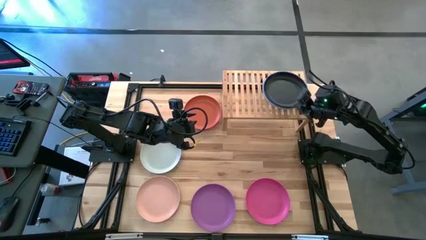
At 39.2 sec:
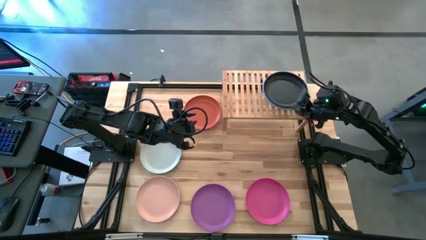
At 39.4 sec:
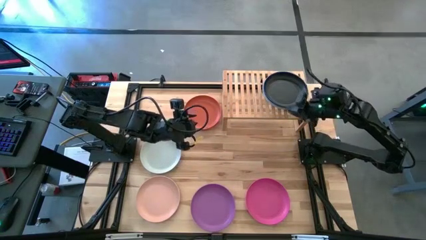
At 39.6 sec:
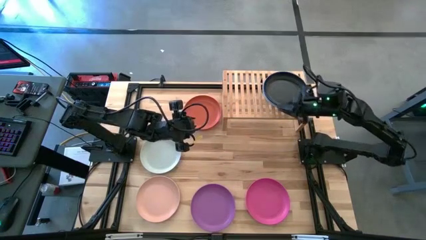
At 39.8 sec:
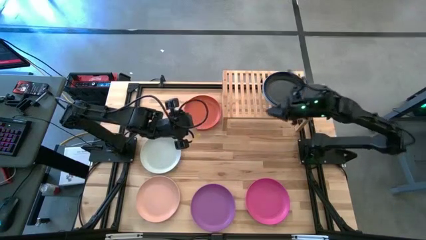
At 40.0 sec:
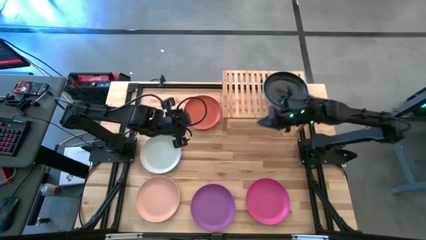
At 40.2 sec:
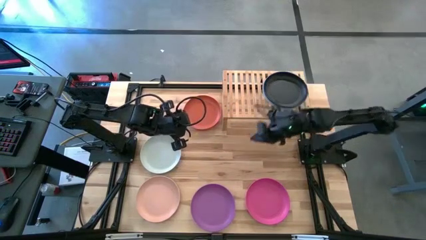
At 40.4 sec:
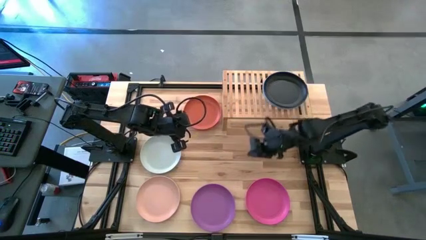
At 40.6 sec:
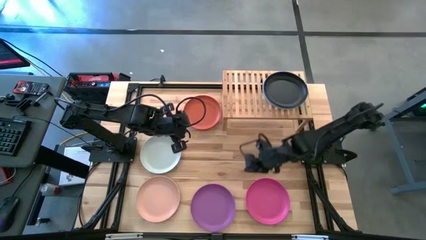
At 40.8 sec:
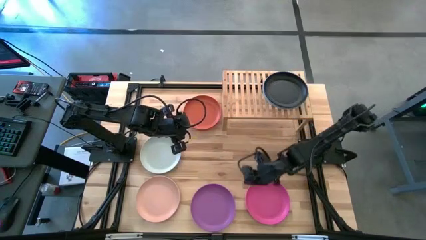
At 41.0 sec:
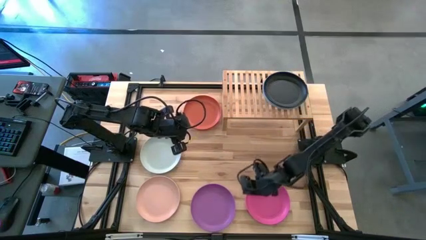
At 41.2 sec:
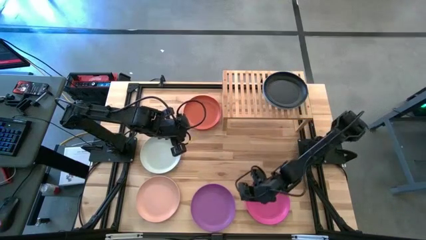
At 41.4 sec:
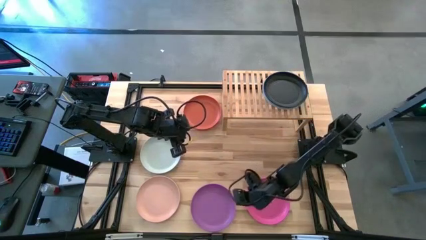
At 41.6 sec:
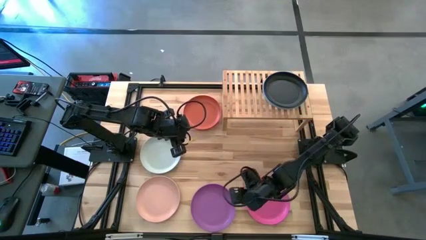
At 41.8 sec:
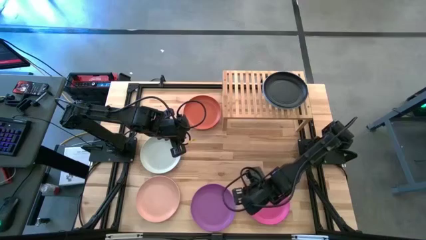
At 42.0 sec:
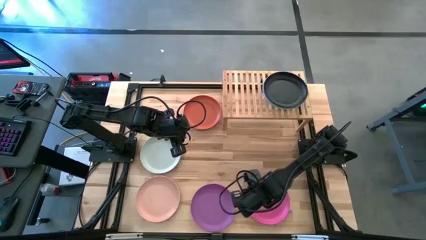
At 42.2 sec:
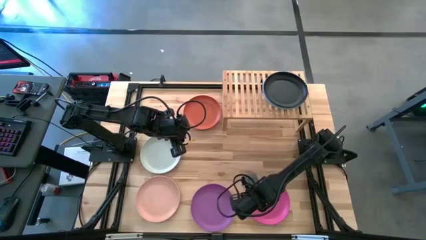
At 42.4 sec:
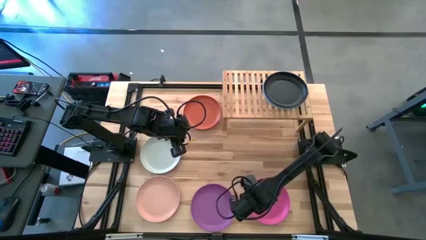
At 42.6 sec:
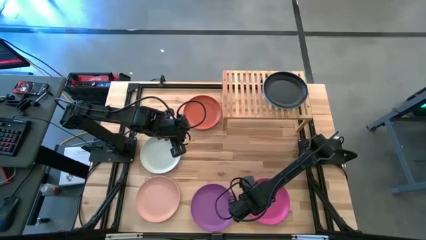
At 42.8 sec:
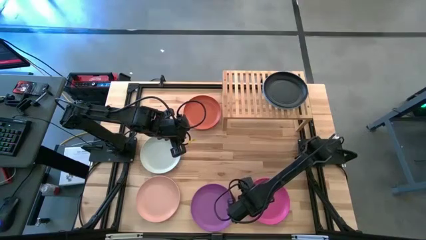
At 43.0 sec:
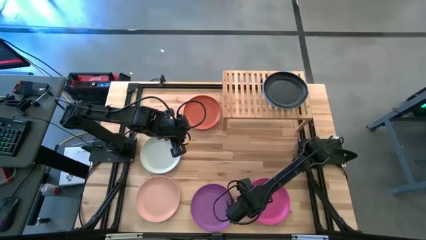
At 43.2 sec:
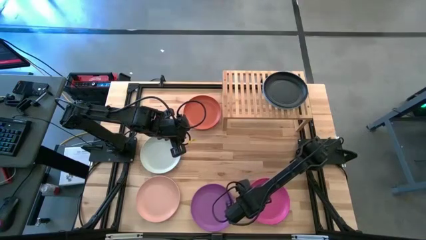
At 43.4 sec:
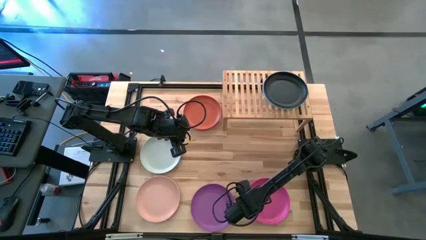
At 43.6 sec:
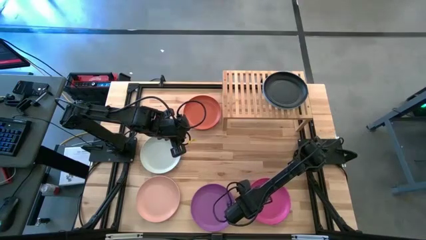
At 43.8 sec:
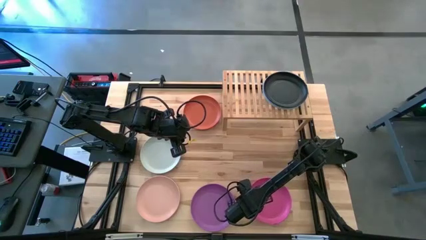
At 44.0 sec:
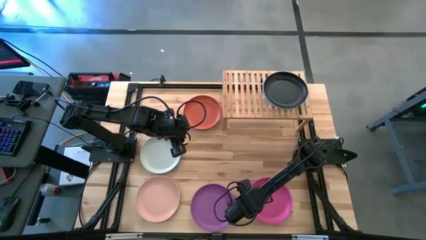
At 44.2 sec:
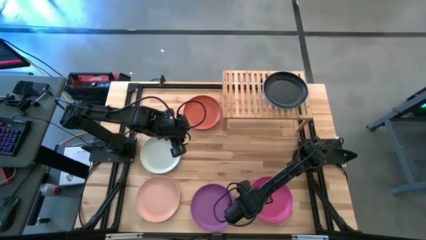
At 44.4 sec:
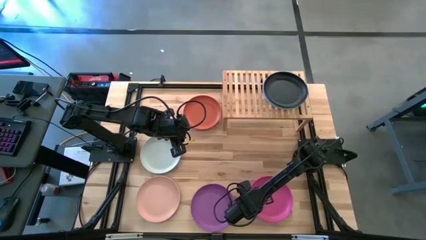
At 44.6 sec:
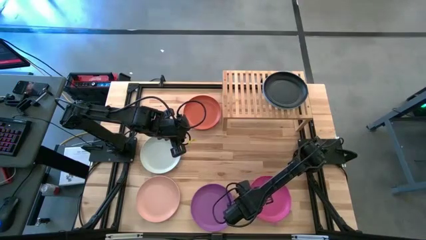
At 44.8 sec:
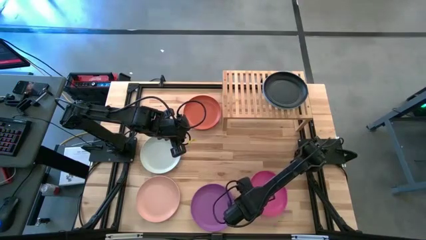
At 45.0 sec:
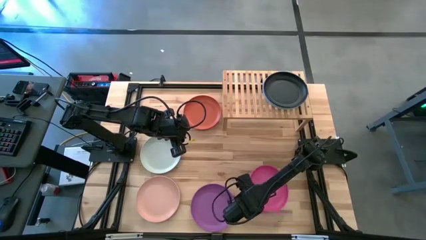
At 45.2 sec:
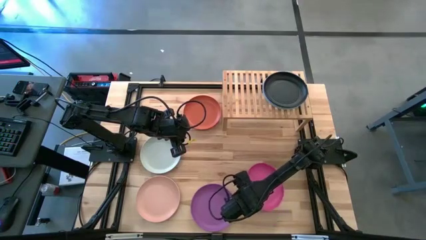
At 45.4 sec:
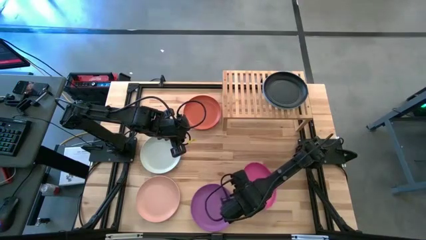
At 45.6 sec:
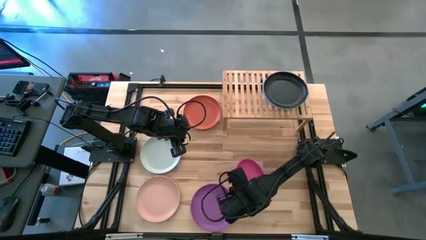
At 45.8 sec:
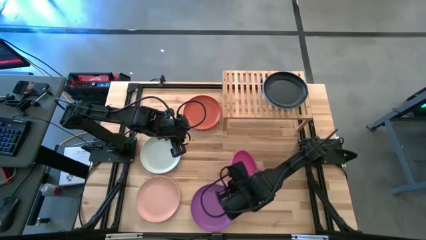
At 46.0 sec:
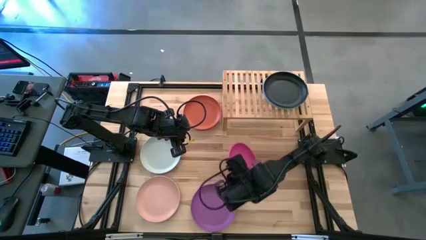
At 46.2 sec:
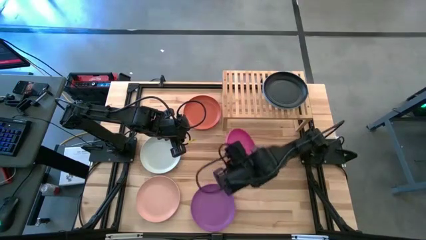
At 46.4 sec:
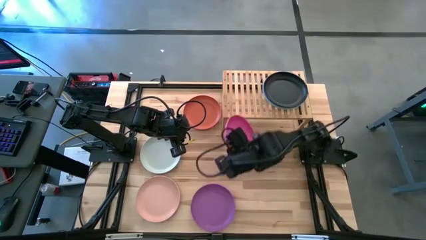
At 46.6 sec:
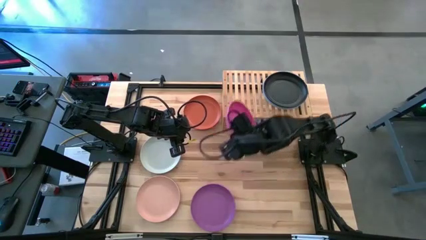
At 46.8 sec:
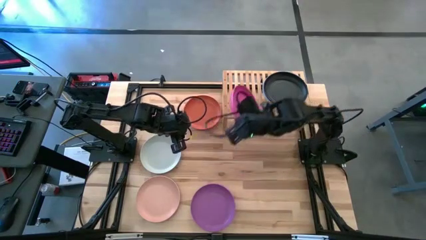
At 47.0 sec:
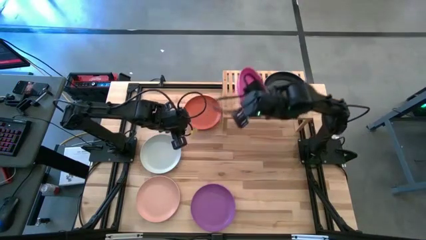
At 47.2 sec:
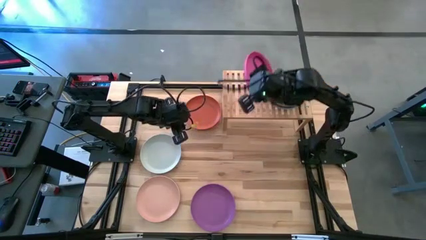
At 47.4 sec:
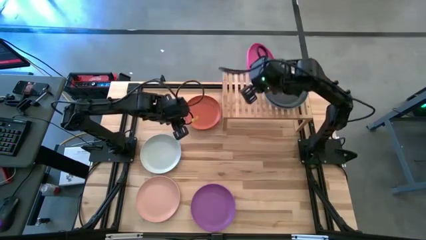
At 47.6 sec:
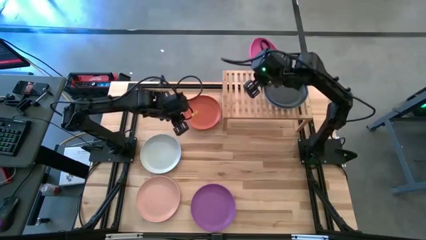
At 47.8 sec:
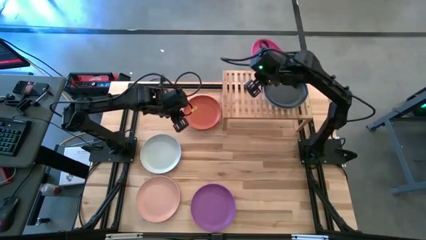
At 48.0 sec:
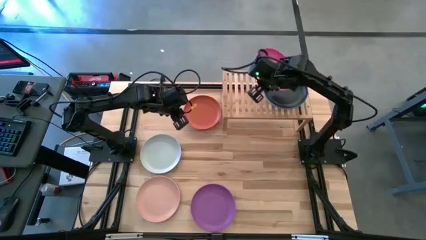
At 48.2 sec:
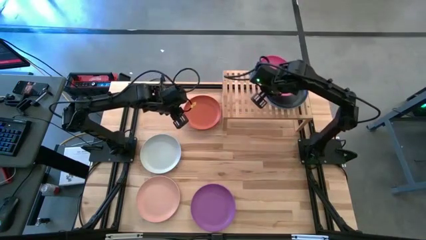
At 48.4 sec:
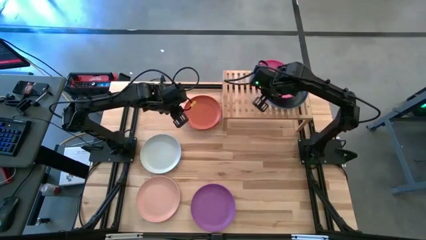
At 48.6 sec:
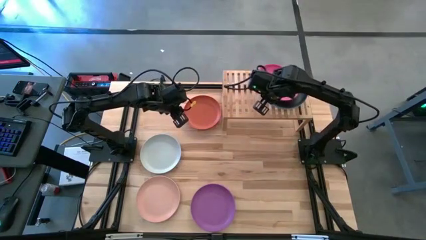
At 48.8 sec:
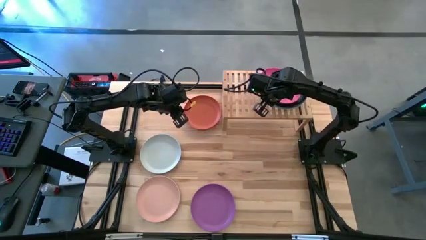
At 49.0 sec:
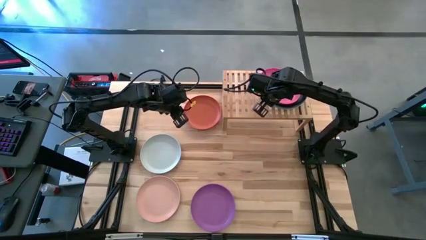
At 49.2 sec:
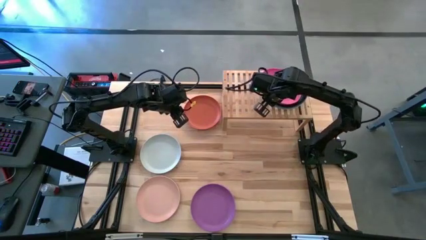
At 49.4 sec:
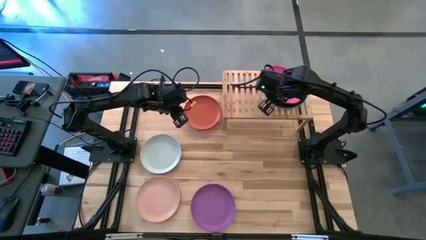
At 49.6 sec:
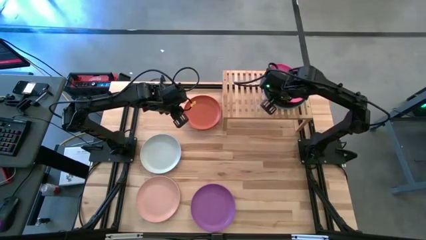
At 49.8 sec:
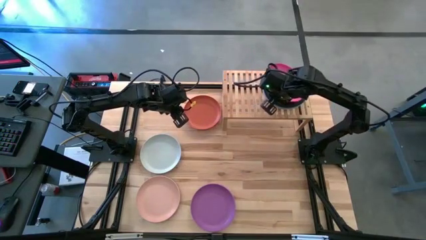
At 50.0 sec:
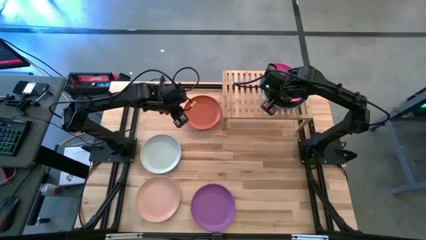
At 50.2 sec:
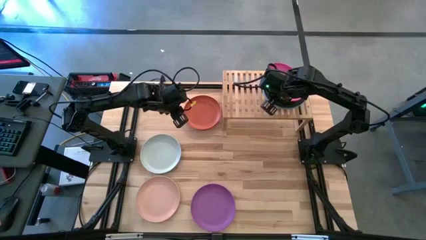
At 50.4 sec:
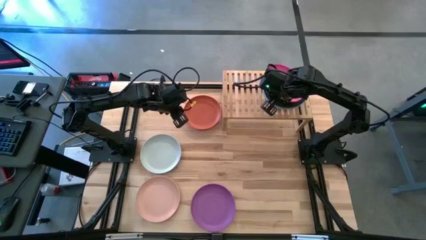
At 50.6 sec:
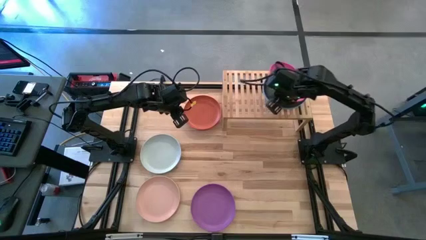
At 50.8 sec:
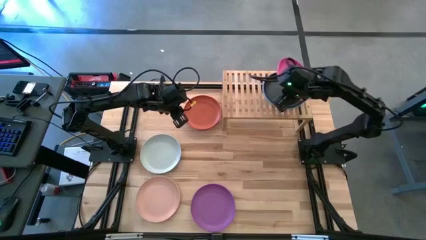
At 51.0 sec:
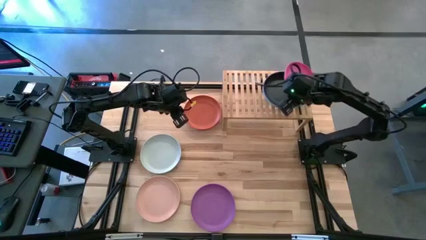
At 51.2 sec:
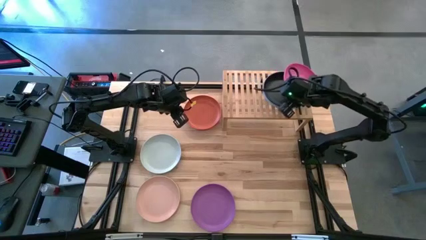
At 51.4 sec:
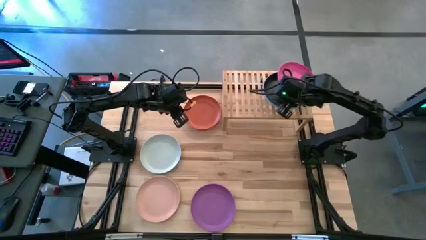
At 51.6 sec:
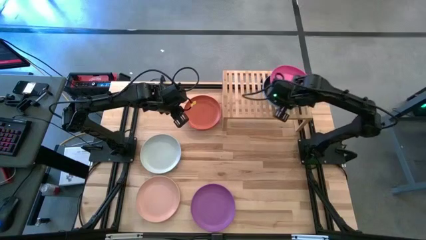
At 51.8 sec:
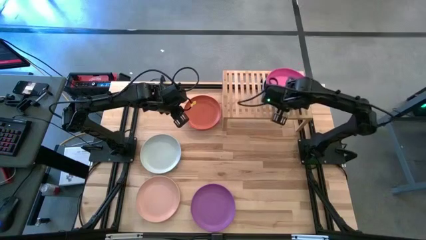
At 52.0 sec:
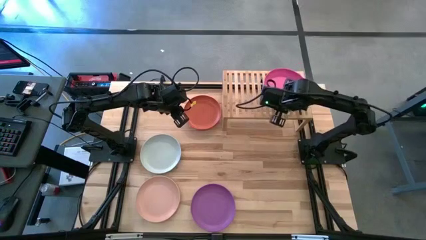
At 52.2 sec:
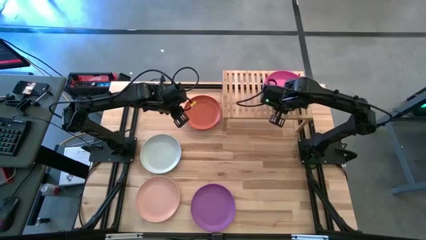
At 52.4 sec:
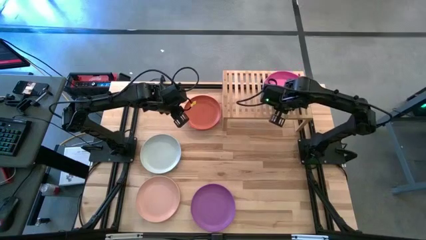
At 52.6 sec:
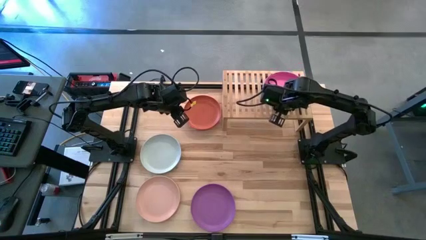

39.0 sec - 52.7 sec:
Task: Place and stack plates onto a shelf
Stack the pink plate on top of the black plate on the shelf

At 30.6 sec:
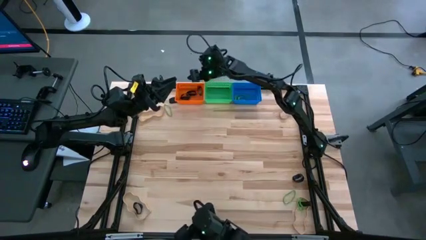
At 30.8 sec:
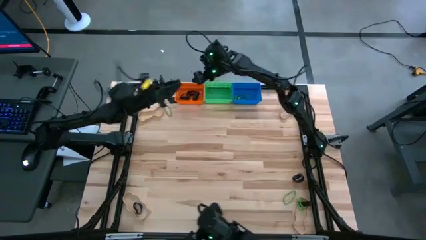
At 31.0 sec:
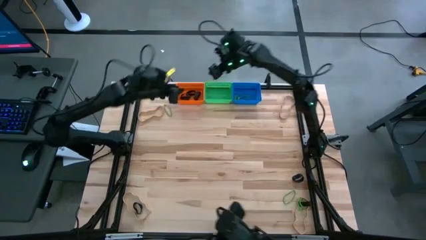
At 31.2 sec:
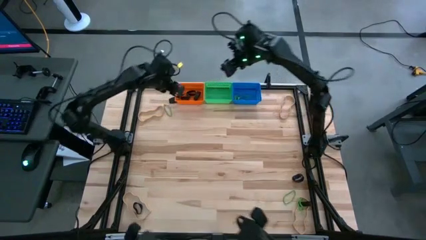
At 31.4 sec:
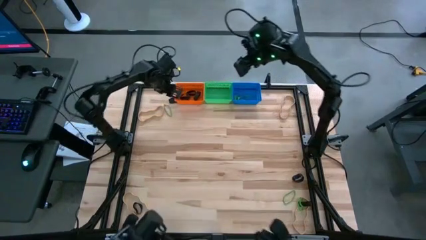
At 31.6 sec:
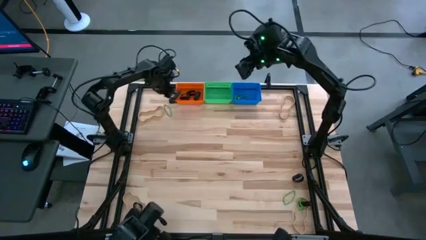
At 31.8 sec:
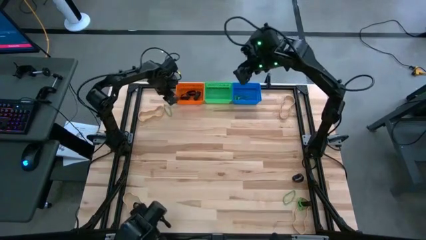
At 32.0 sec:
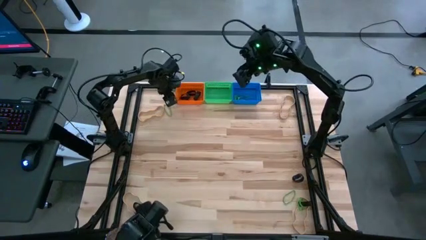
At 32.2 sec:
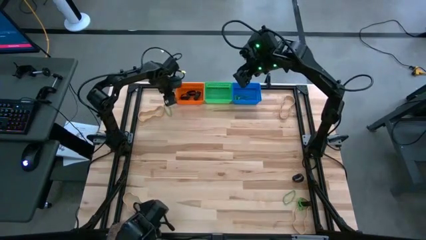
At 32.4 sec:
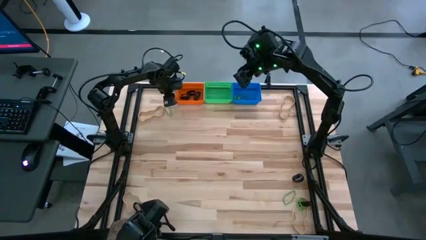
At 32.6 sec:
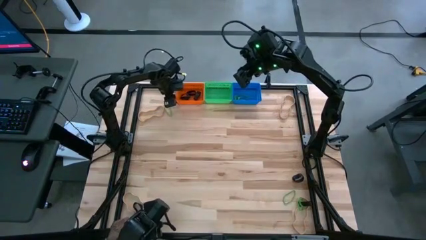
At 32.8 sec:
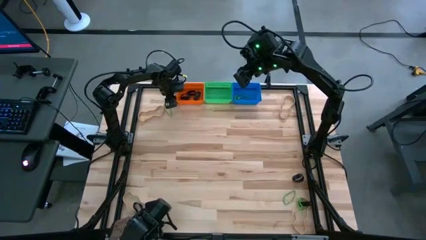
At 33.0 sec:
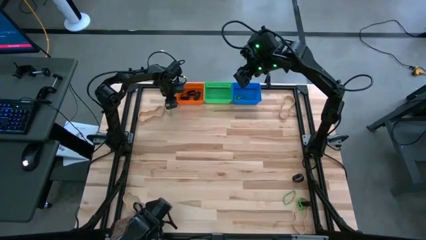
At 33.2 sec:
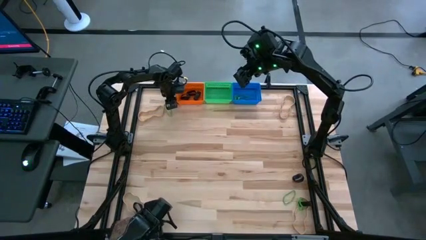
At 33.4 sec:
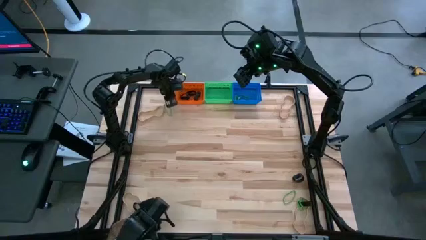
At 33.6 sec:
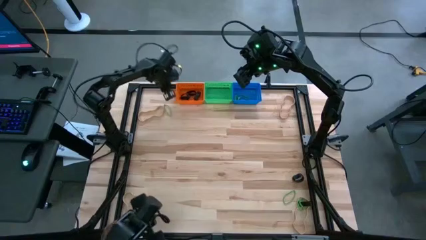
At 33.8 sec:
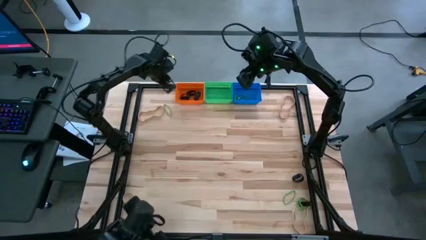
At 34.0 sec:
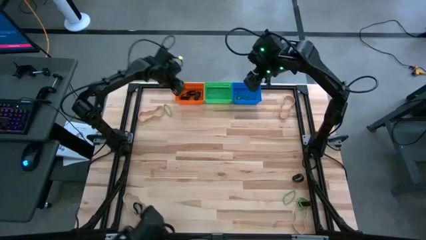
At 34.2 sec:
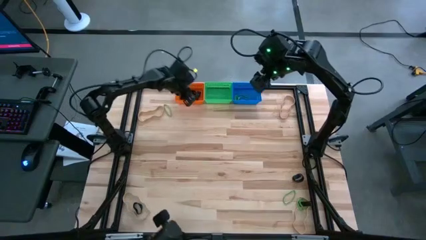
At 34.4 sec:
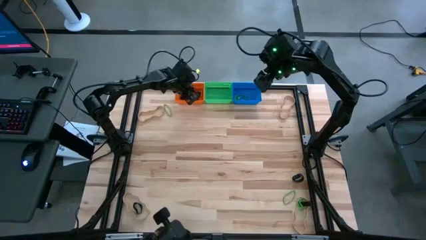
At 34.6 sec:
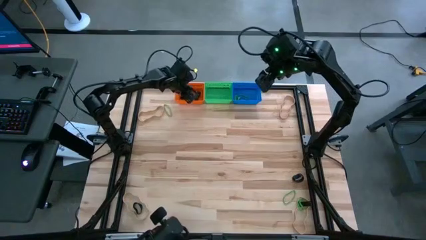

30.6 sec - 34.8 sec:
Task: Sort rubber bands into baskets
Put the black rubber band into the orange basket
